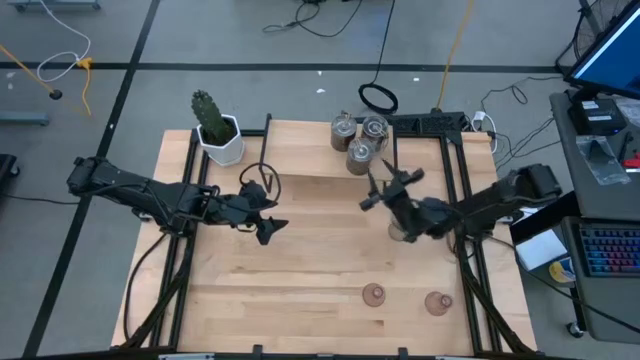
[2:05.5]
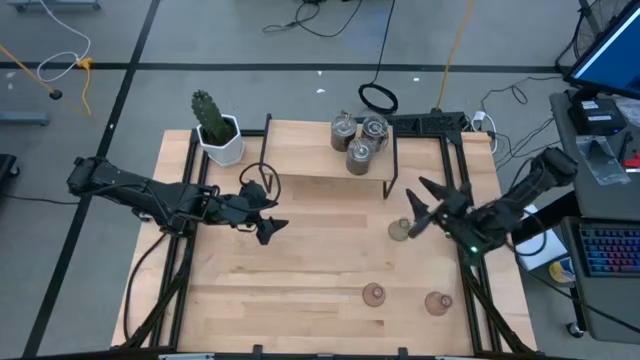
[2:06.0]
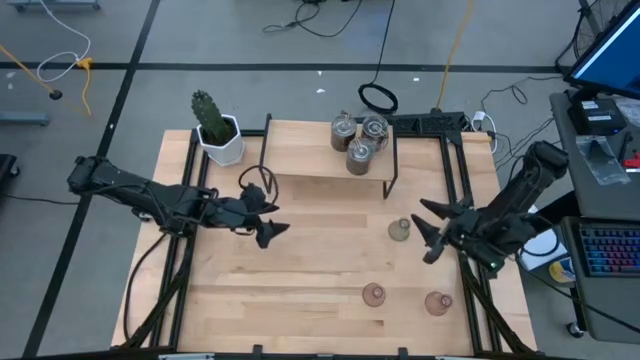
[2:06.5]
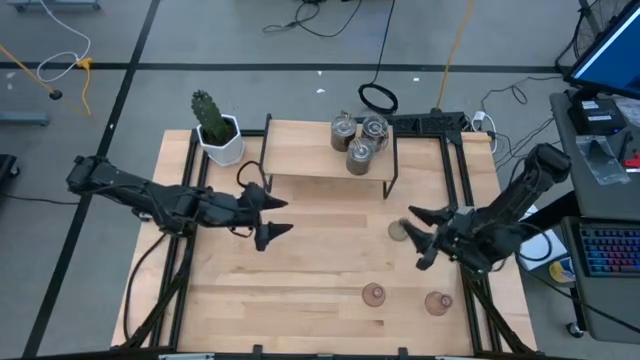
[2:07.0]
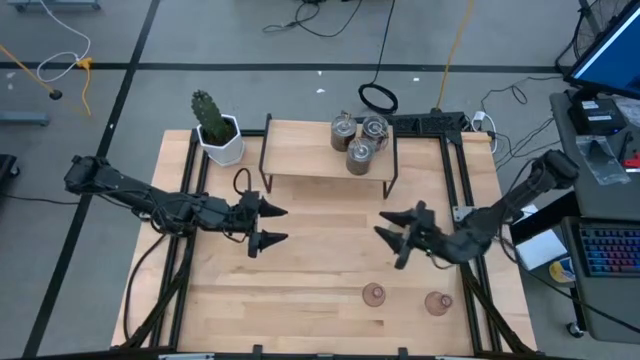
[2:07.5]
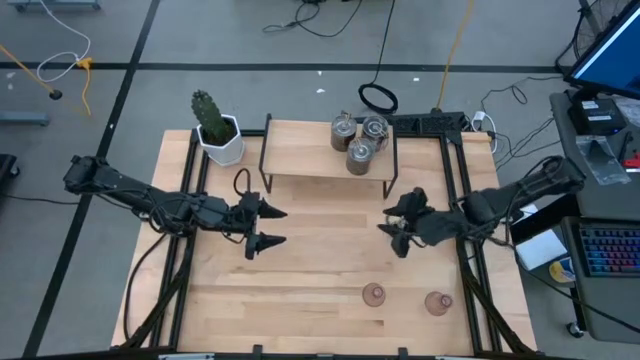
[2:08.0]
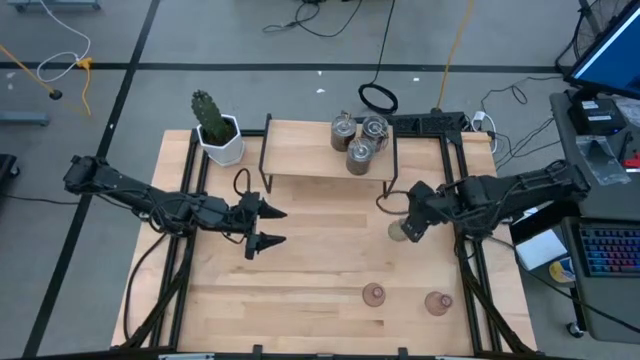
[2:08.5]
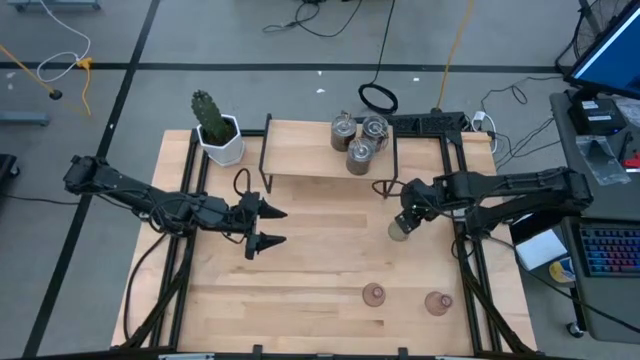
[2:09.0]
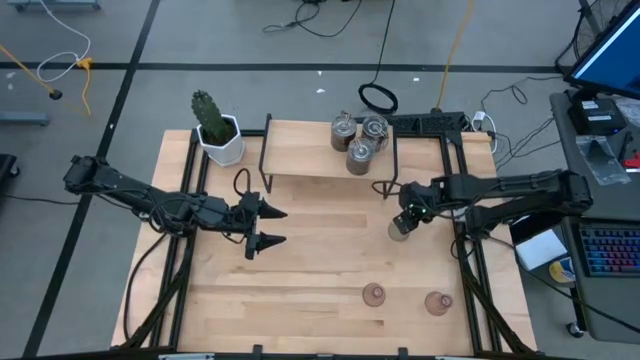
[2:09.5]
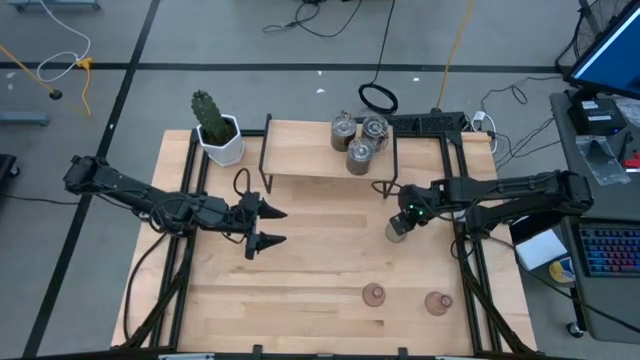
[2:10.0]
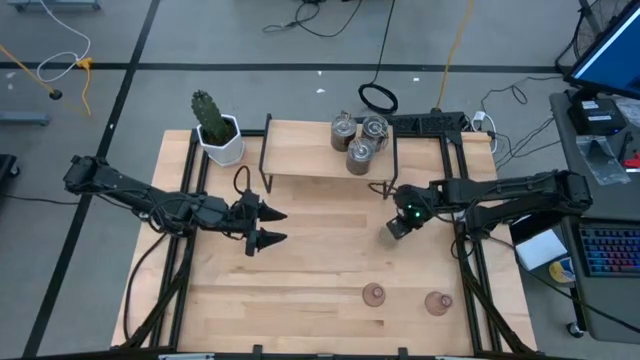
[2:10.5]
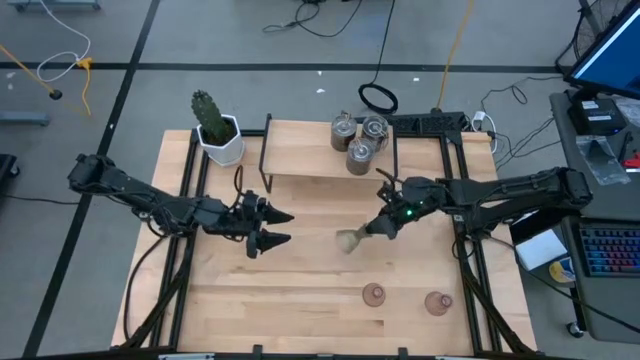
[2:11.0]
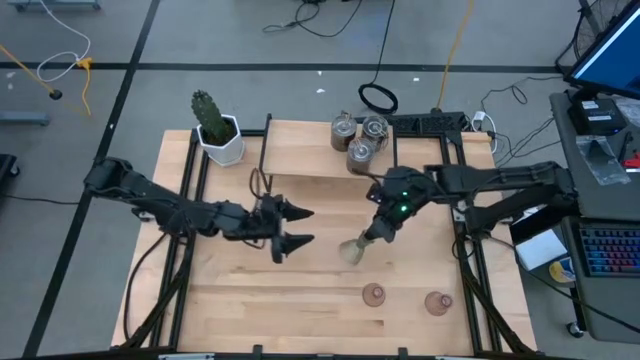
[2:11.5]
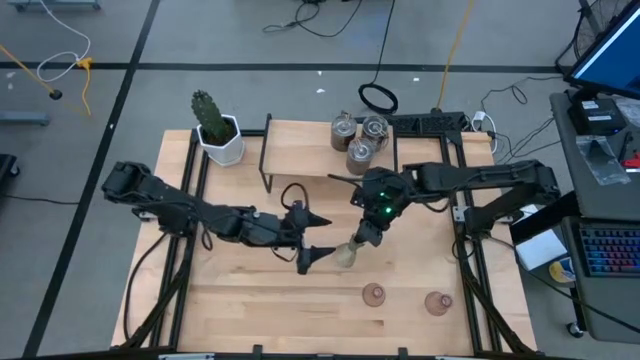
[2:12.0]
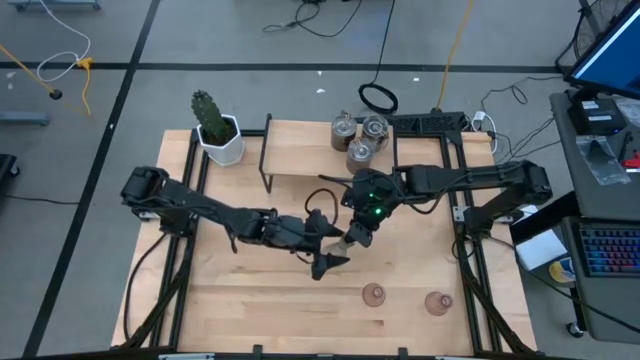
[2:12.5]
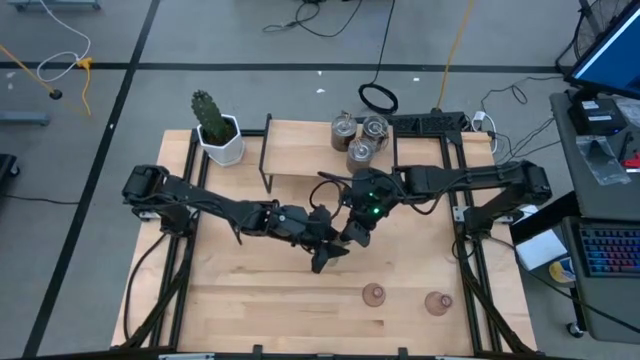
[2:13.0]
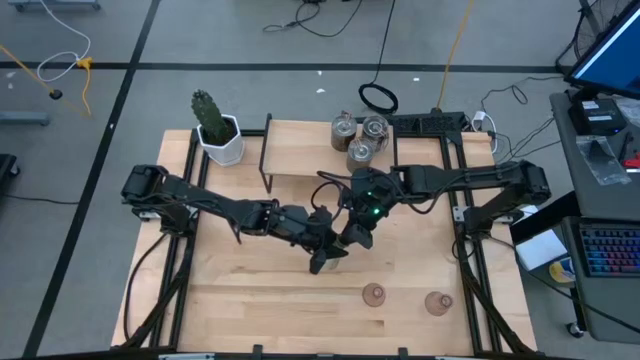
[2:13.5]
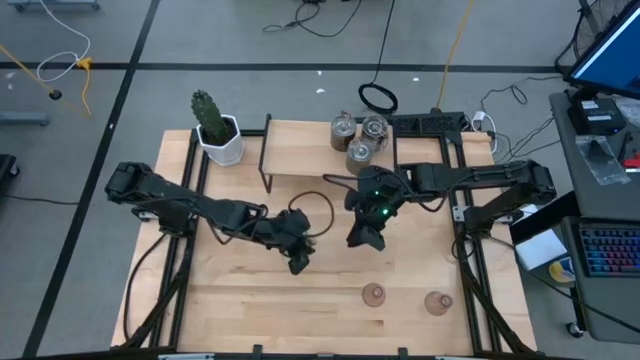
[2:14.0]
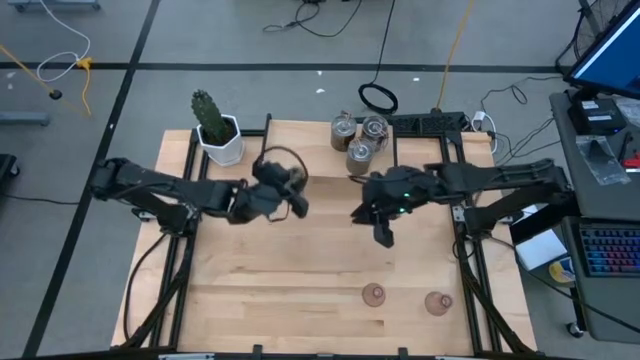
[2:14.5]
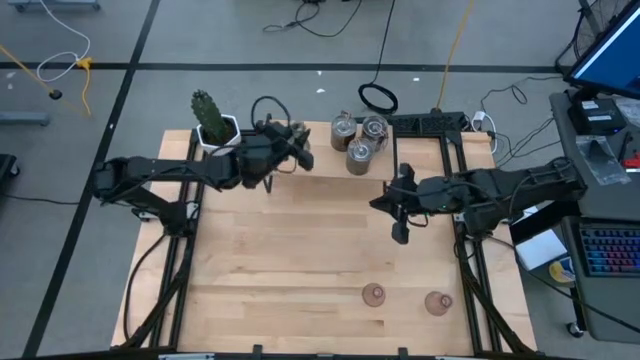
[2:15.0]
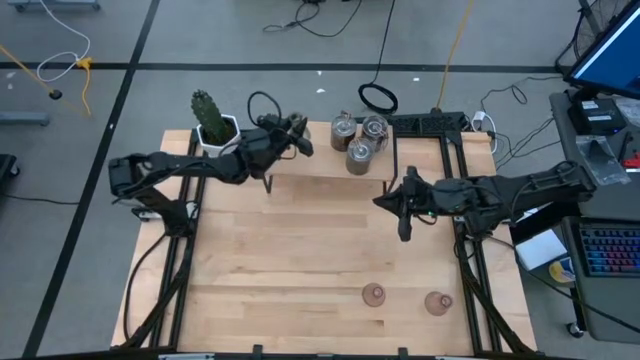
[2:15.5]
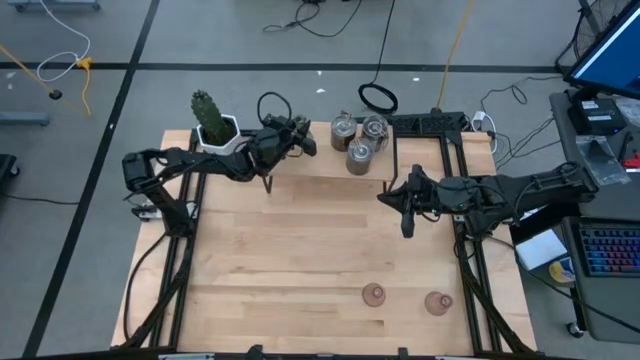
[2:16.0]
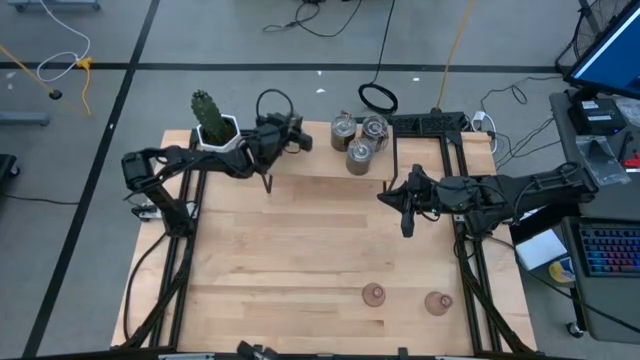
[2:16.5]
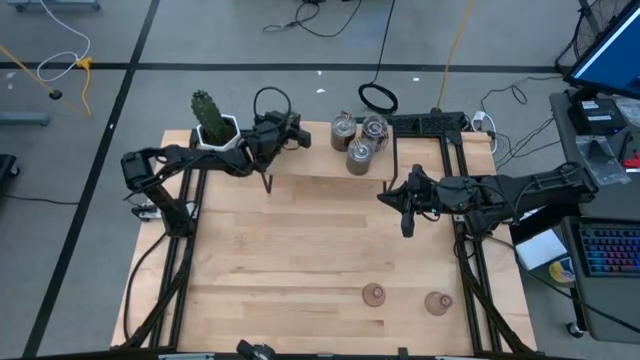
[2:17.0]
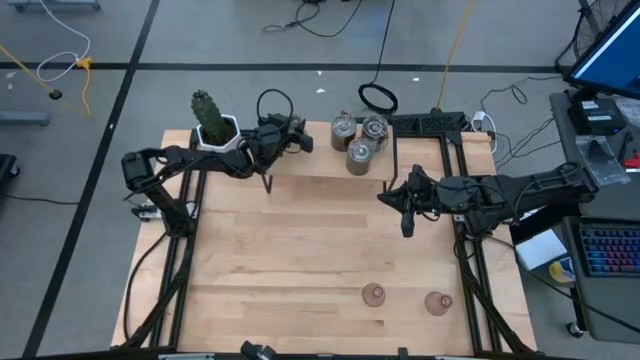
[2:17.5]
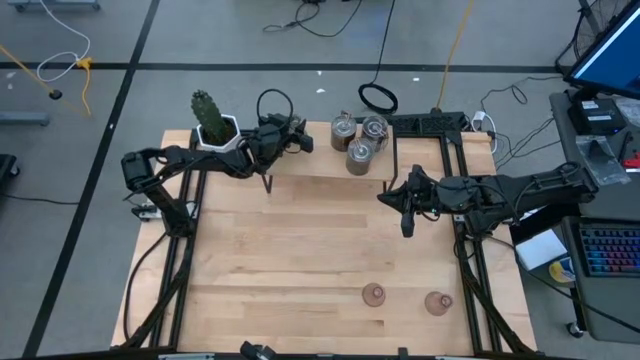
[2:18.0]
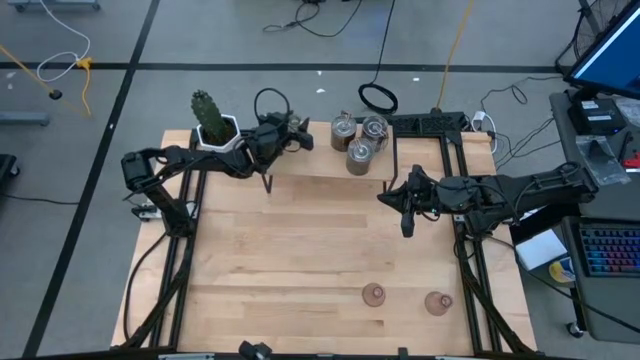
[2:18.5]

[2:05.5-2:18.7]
Task: Pick & Place candle stick holders
Put the green vase candle holder on the shelf

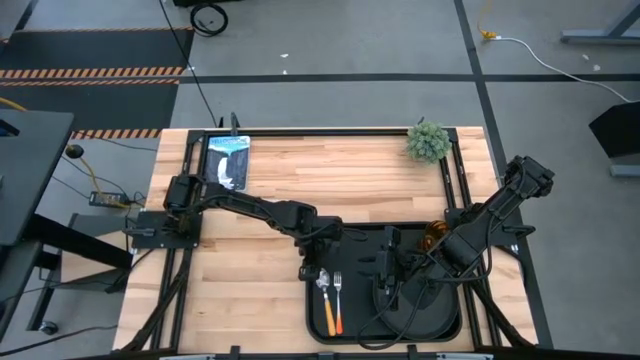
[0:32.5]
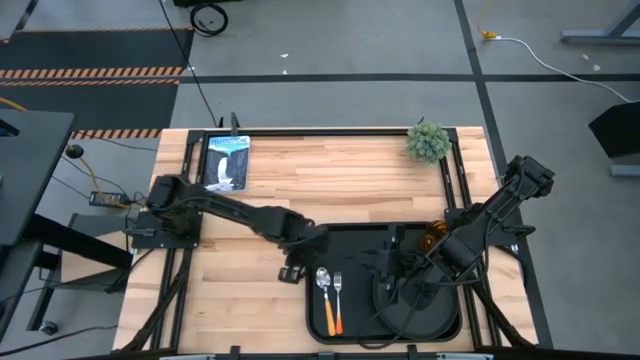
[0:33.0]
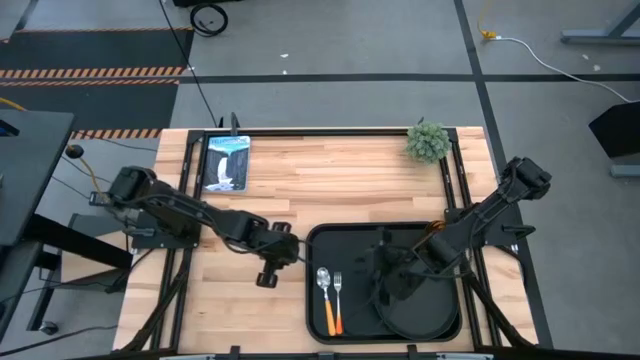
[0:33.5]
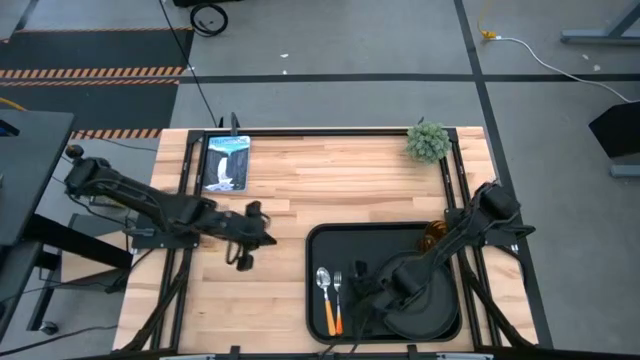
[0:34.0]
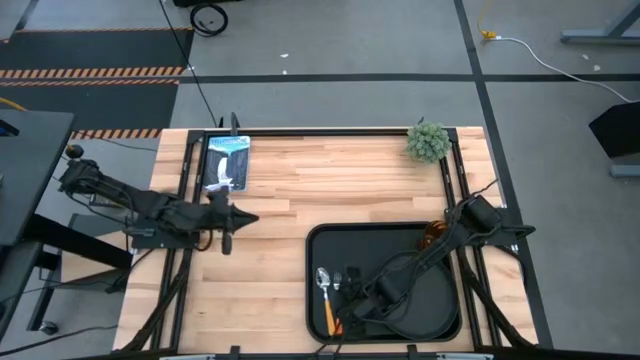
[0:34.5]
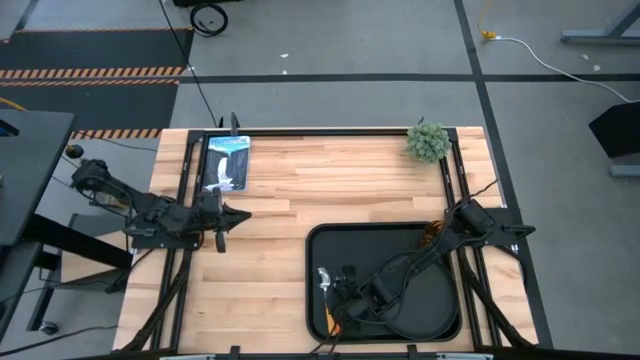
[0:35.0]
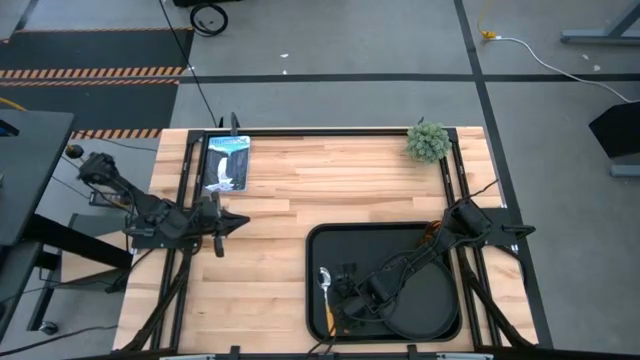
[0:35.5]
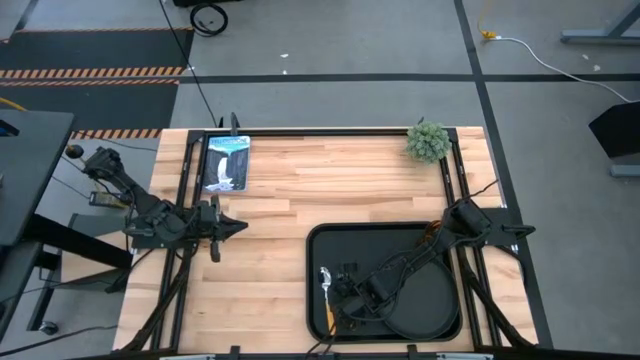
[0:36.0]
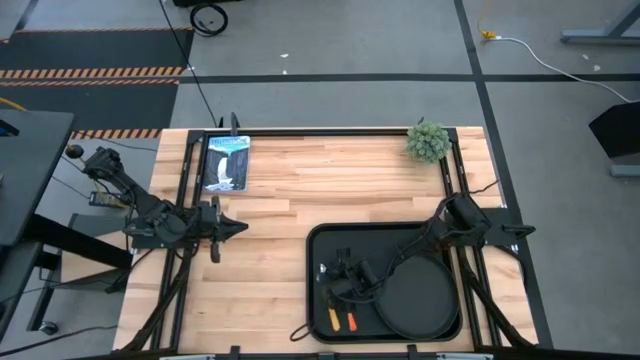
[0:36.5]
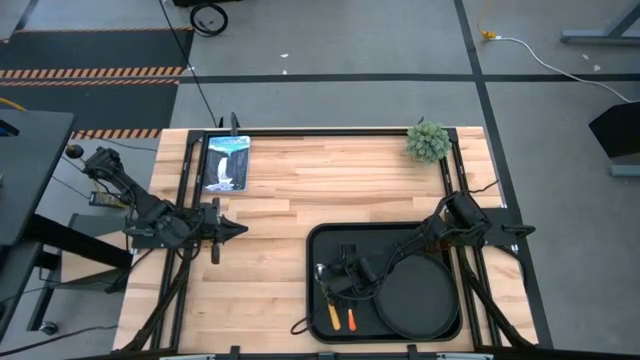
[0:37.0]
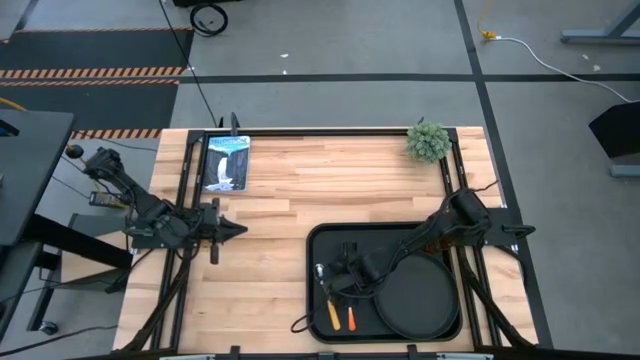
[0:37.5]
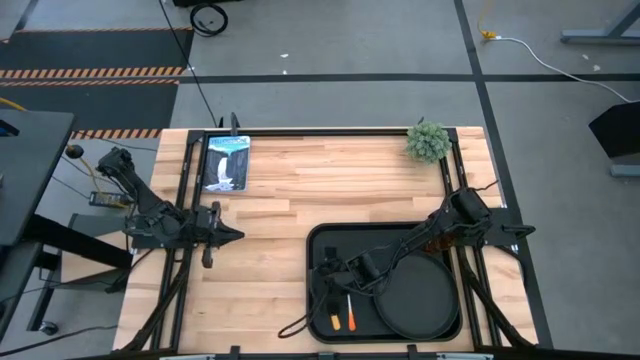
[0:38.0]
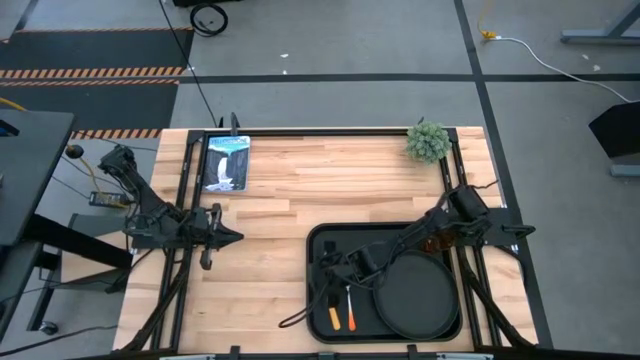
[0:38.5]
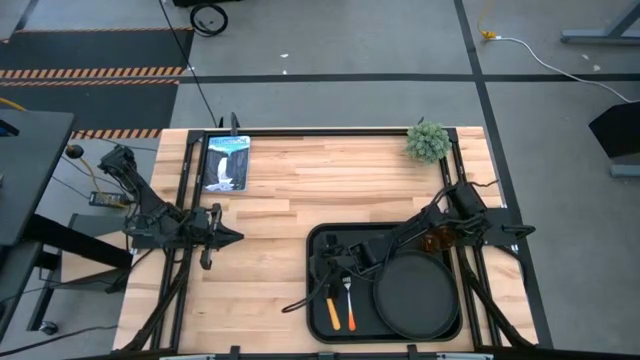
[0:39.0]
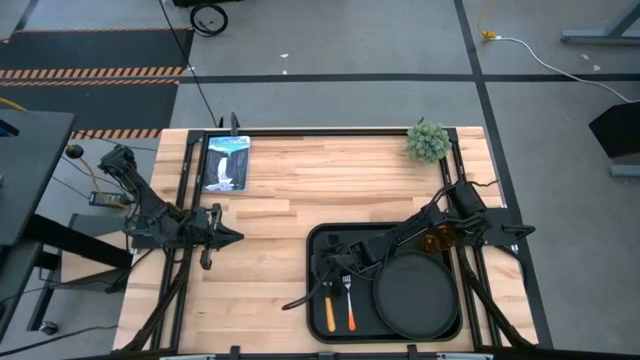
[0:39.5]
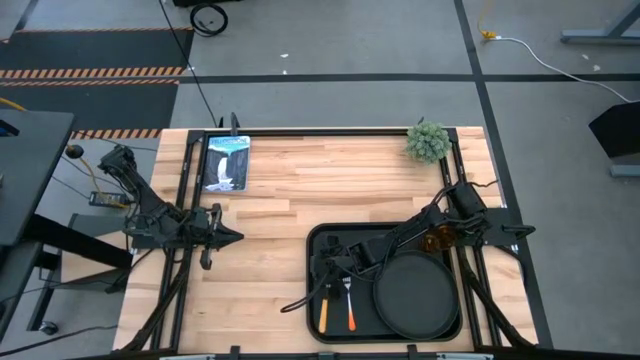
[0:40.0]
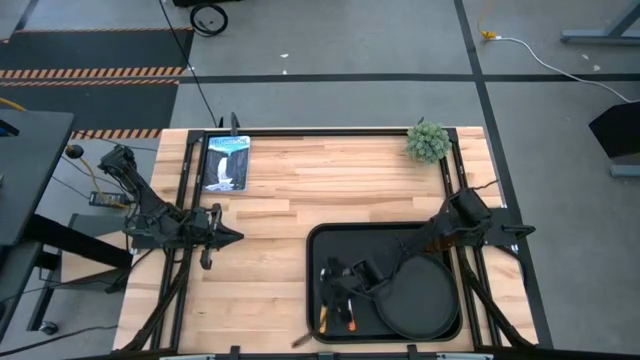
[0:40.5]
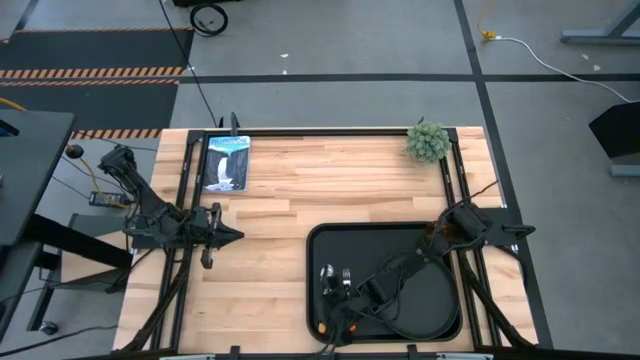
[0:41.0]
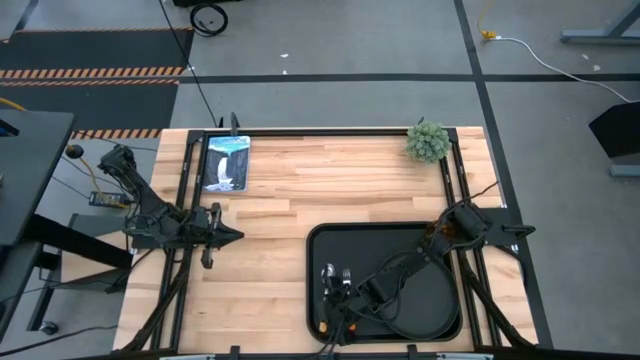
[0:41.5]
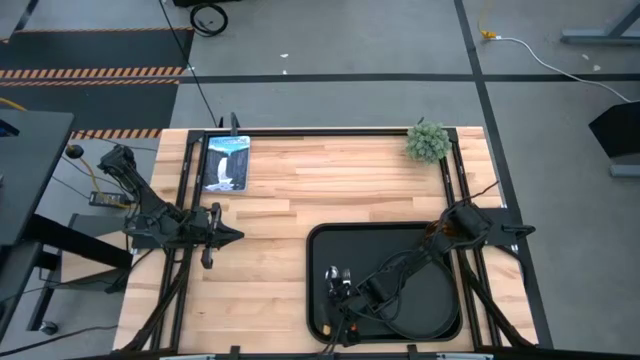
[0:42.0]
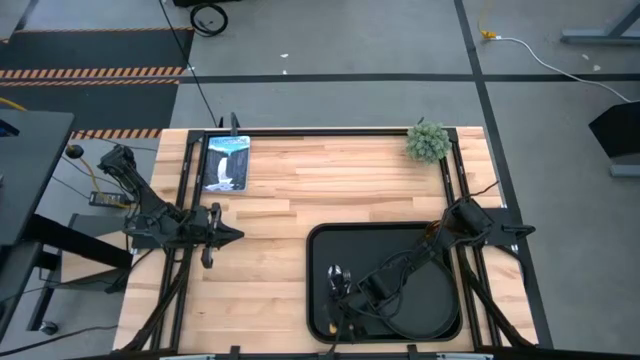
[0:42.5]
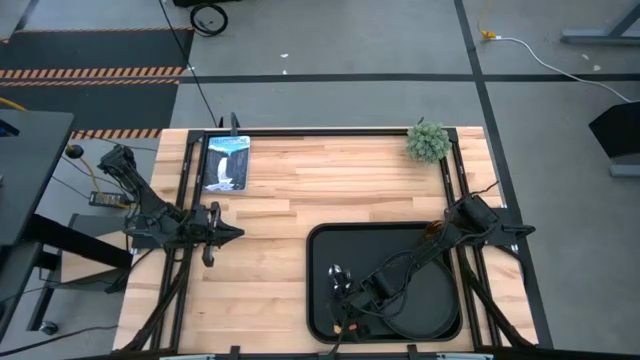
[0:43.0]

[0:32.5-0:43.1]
Task: Pick and place plate/cup/fork/spoon on tray
Adjust the utensils
